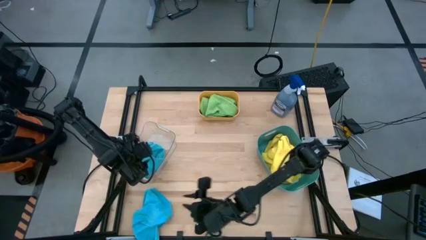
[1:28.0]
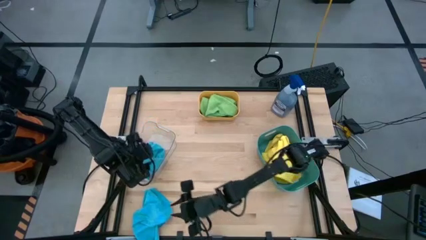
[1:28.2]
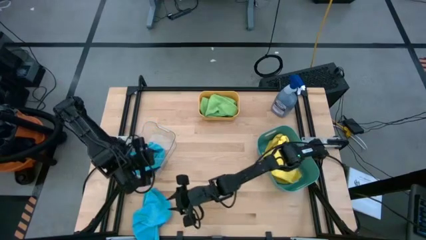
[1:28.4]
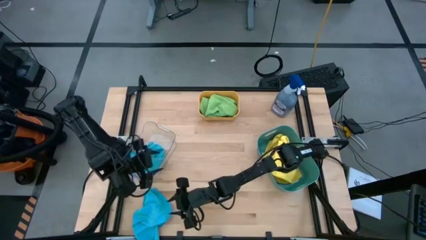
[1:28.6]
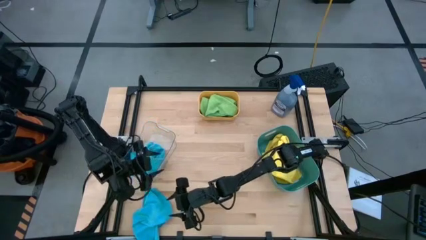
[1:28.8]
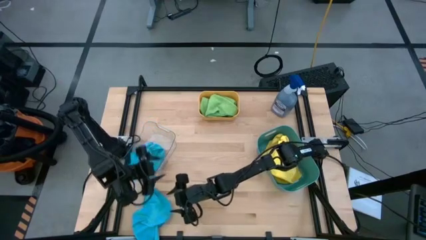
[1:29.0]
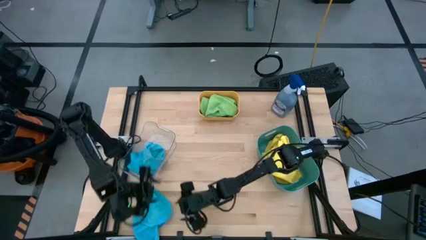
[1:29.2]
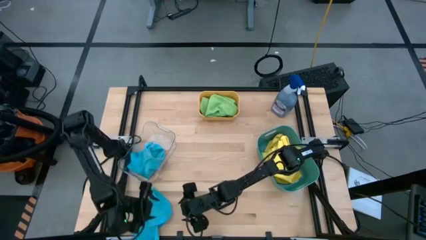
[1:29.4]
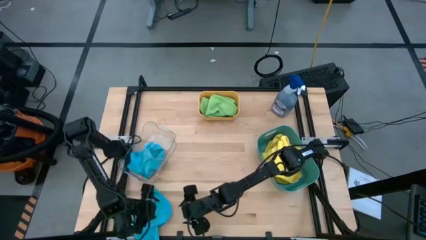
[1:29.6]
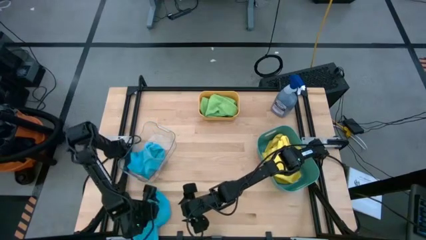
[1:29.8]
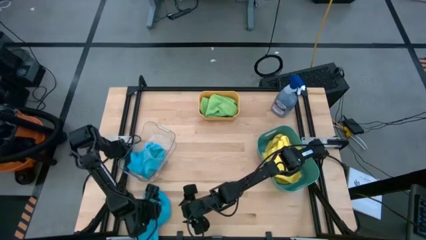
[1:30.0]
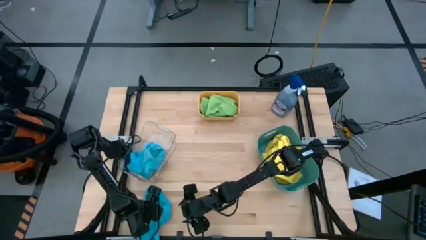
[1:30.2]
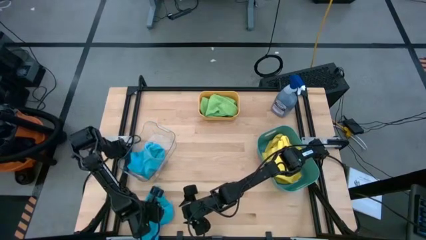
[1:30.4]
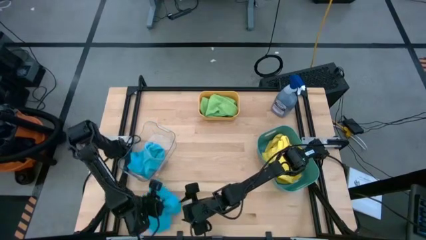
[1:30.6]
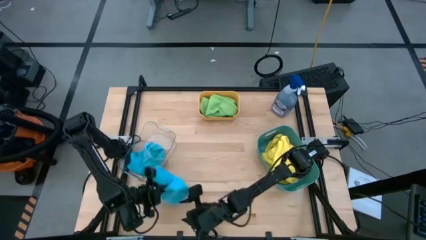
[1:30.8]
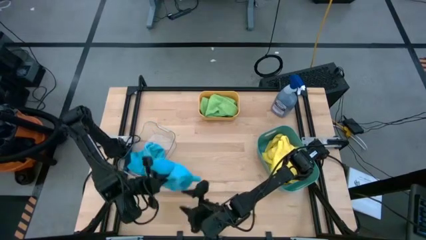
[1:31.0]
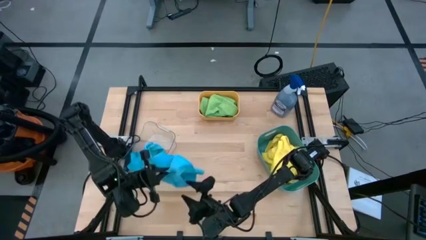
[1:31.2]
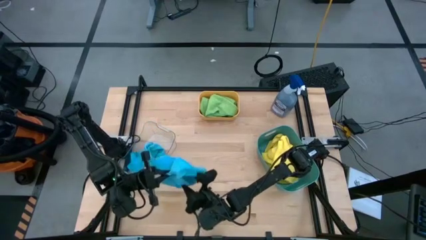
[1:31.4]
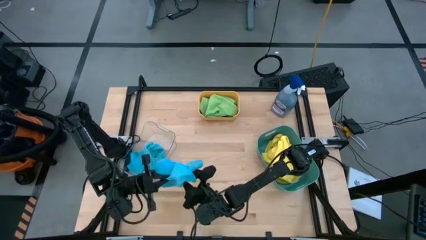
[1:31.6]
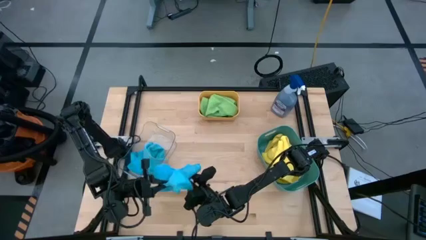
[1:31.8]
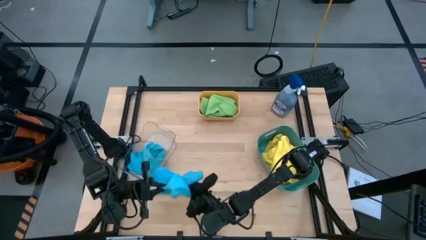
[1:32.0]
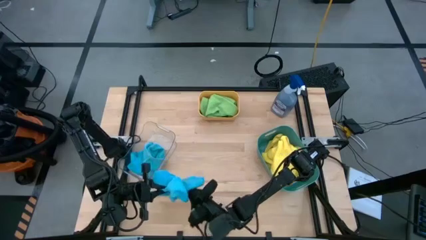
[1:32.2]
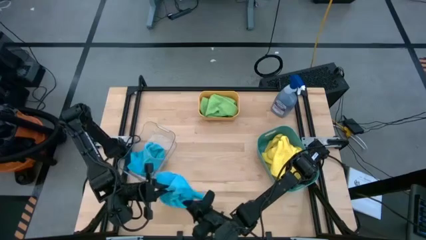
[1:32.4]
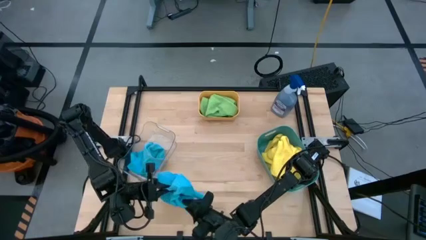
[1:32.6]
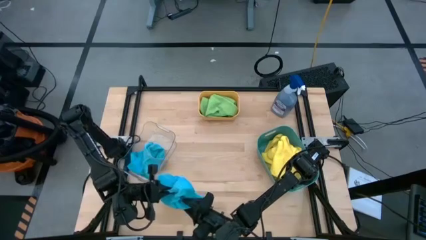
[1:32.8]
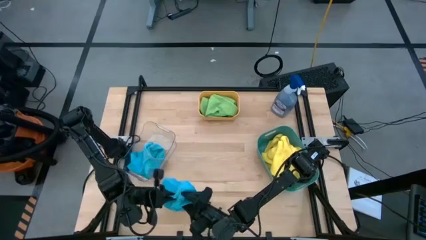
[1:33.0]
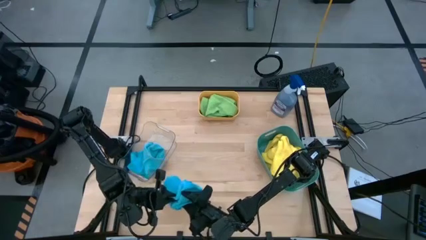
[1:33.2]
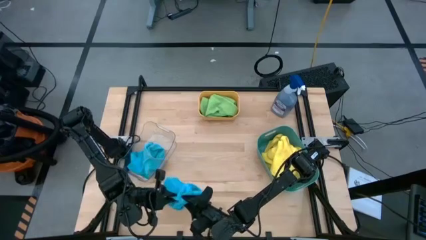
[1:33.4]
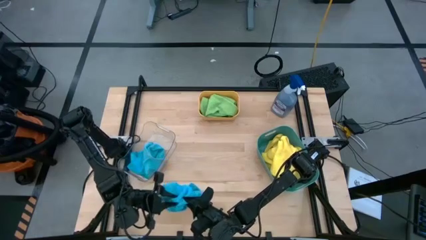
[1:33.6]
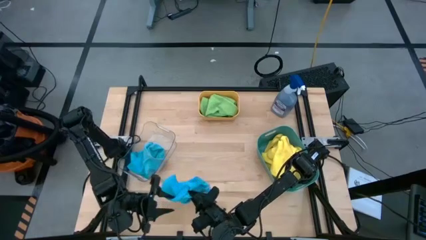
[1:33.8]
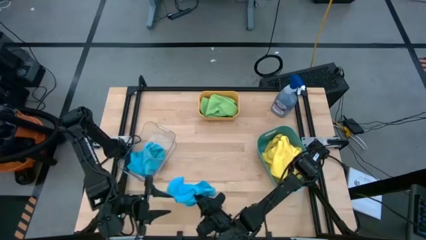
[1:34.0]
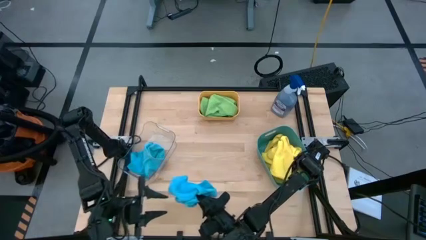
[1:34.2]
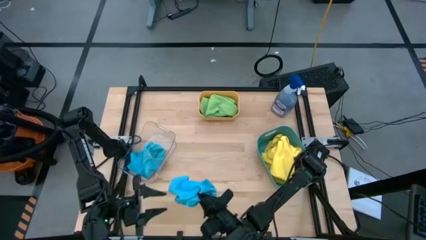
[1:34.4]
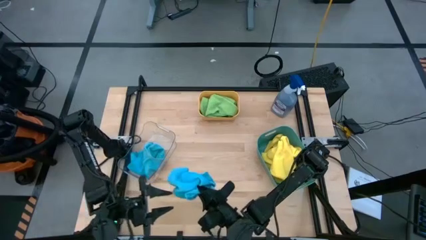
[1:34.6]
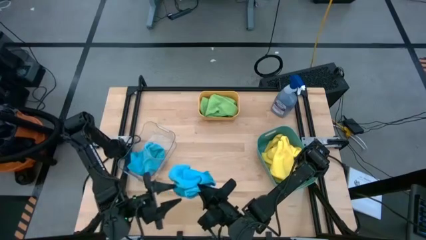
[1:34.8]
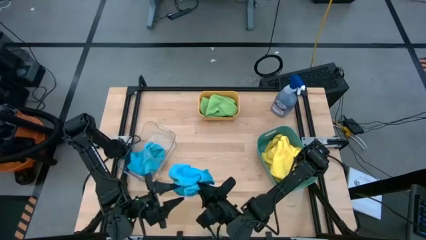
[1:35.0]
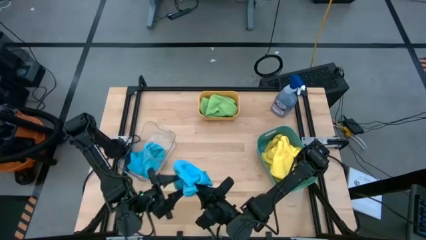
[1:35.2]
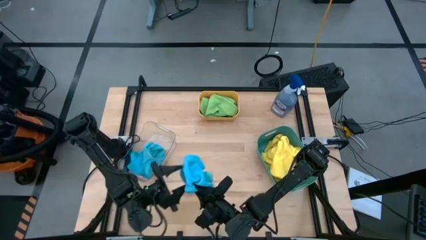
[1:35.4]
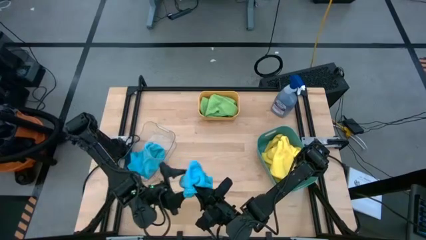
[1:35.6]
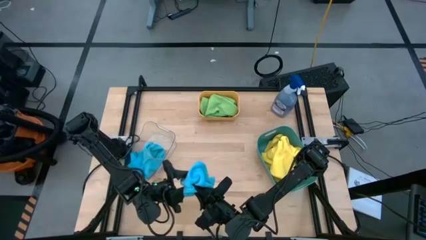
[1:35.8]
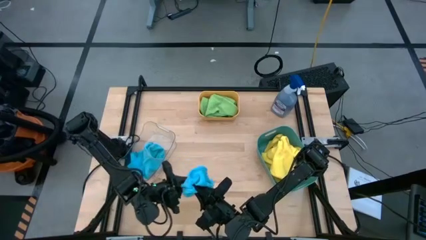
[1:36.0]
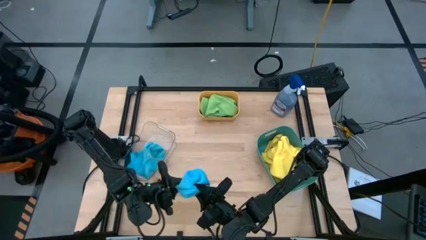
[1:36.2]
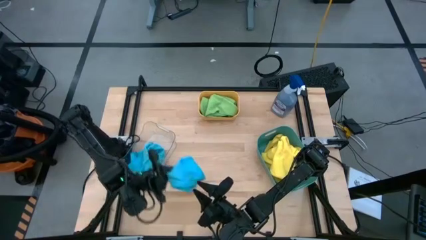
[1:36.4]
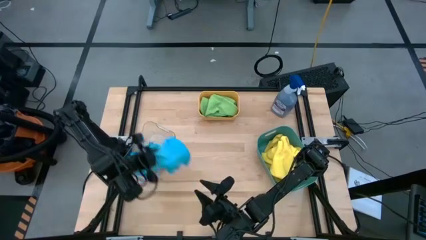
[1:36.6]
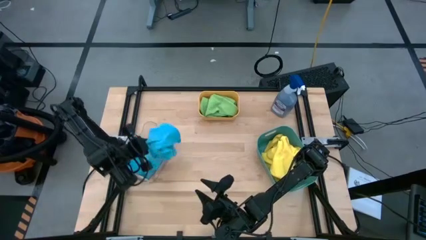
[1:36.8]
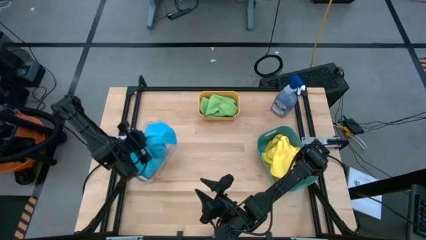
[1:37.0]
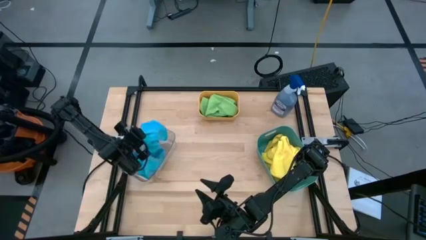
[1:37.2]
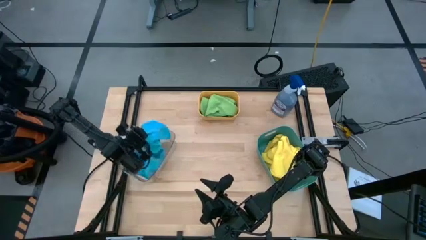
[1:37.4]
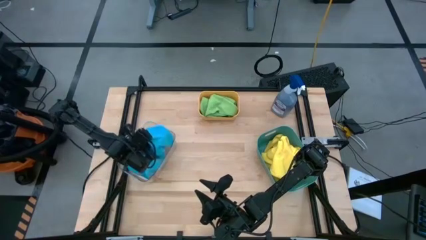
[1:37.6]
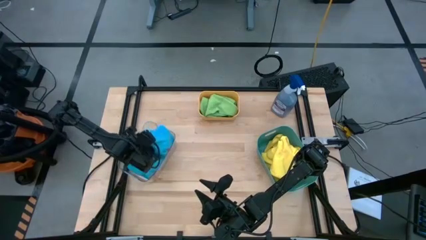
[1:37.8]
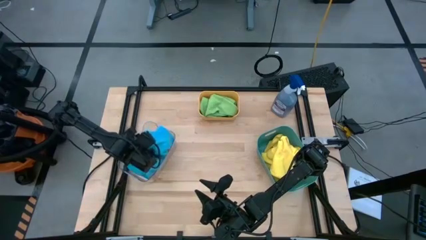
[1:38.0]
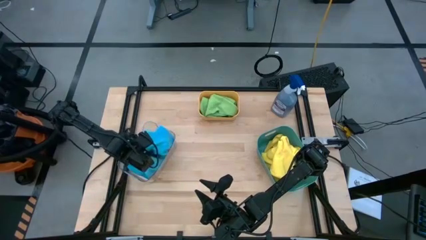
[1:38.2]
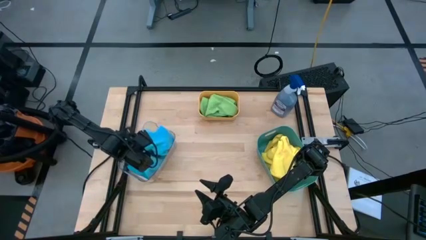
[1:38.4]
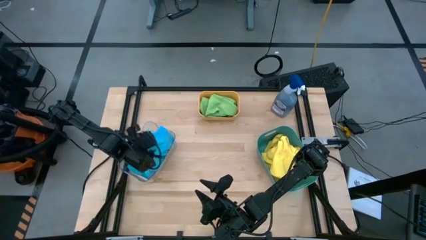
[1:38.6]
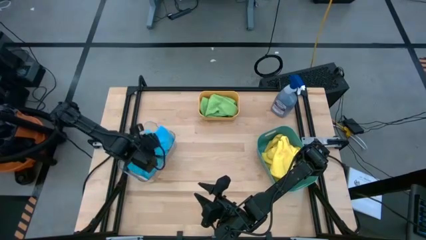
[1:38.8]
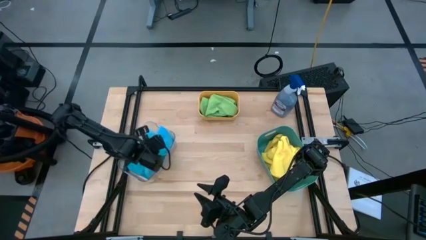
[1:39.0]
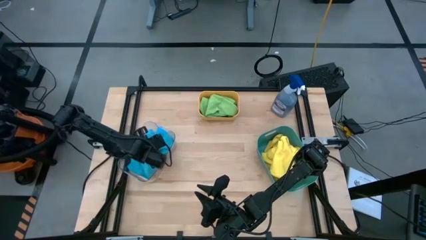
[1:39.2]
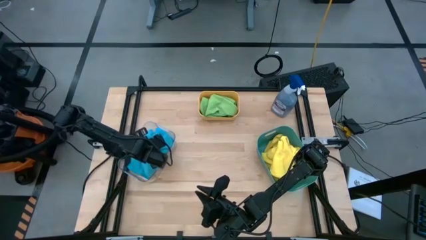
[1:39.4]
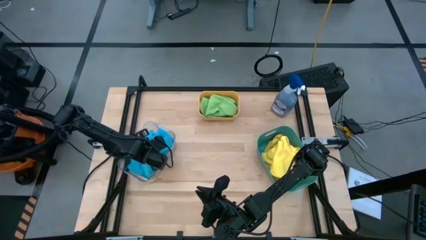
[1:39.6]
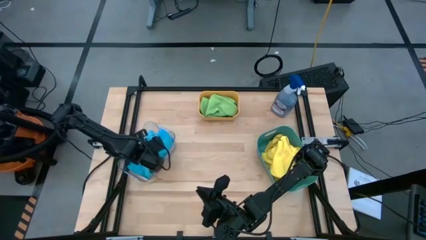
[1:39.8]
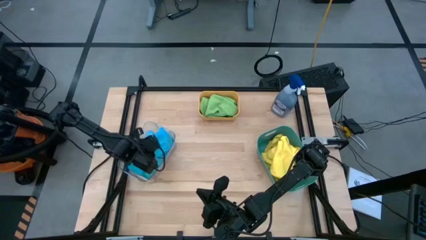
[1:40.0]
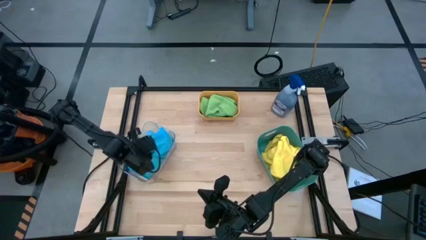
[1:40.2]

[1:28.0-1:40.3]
Task: Sort microfiber towel by color & place in baskets
Put the blue microfiber cloth into the transparent bin
